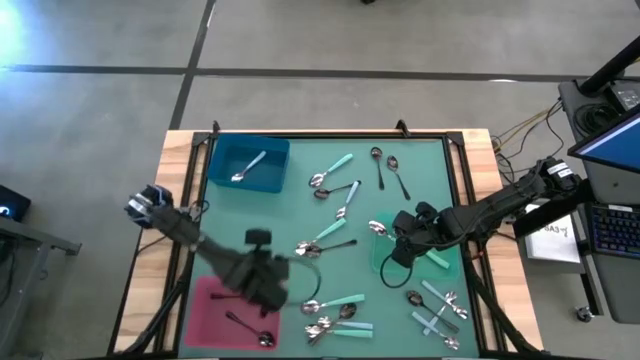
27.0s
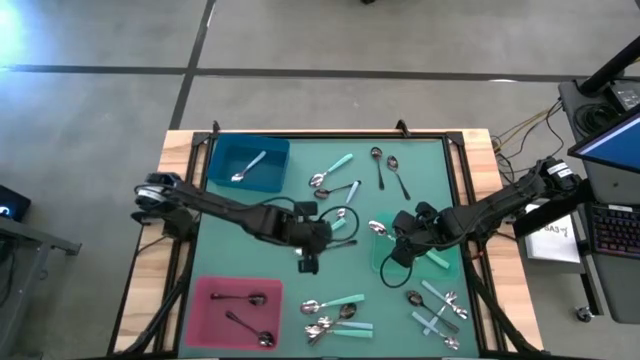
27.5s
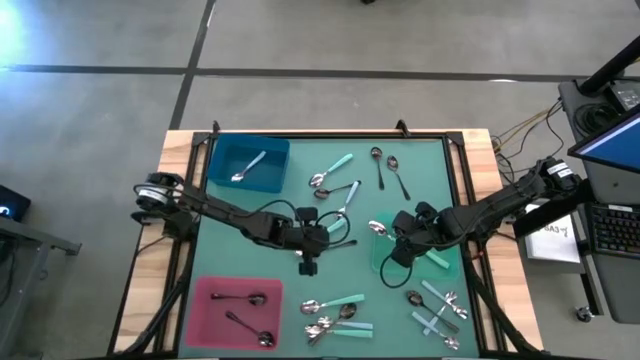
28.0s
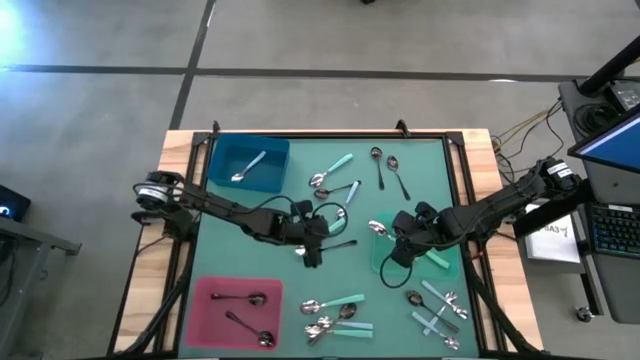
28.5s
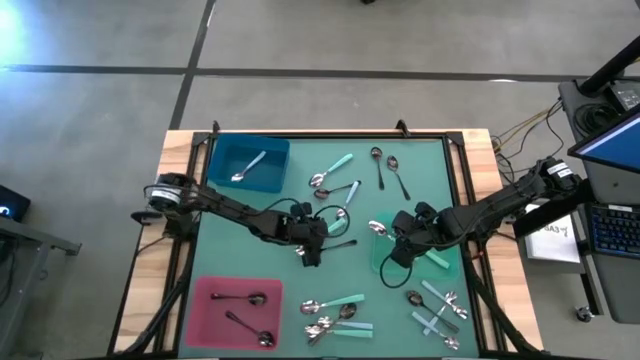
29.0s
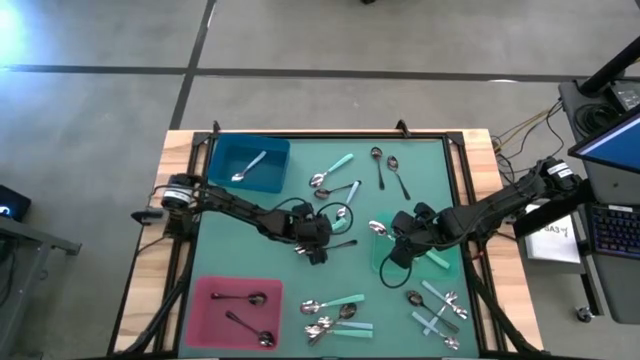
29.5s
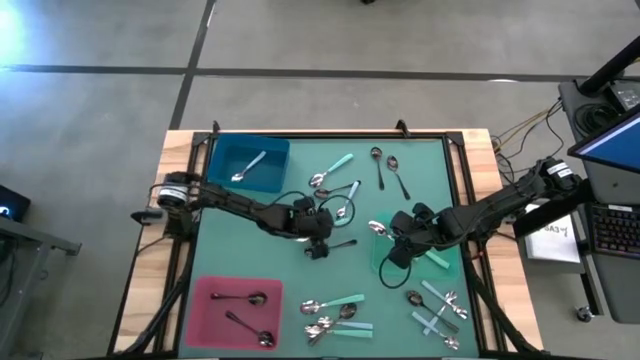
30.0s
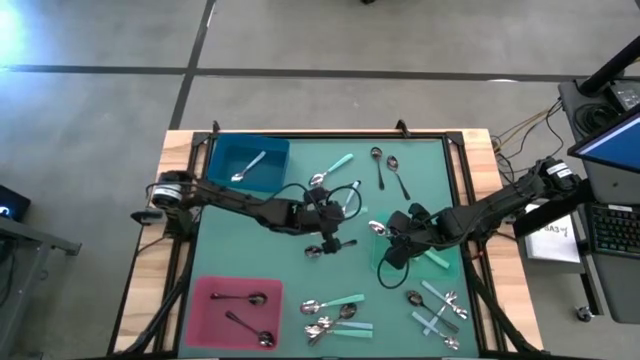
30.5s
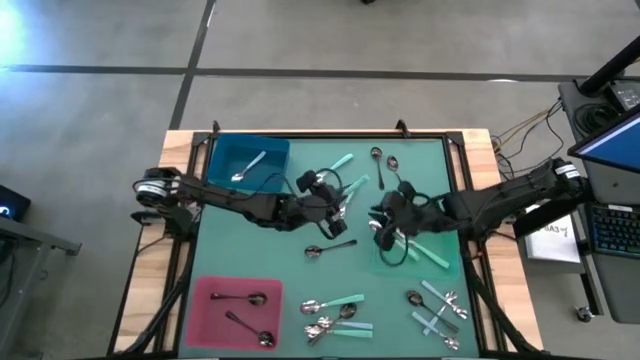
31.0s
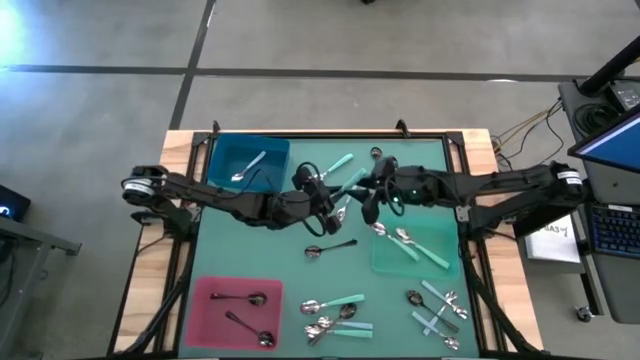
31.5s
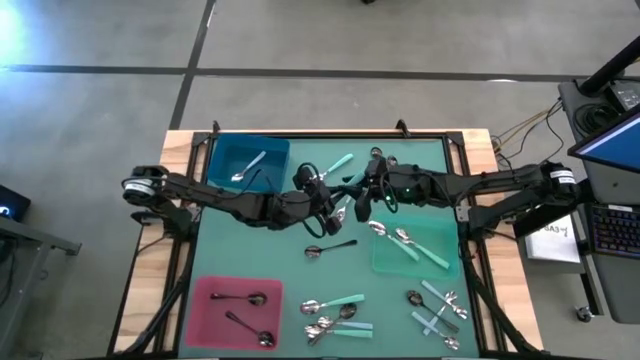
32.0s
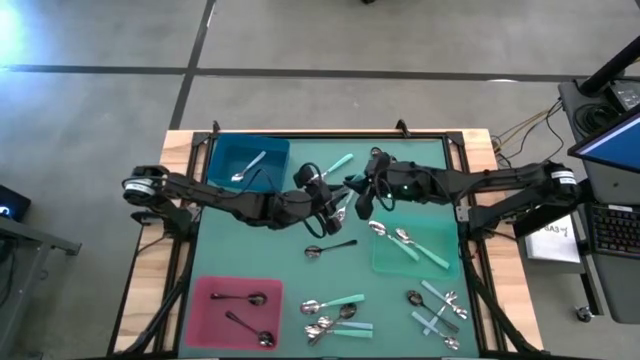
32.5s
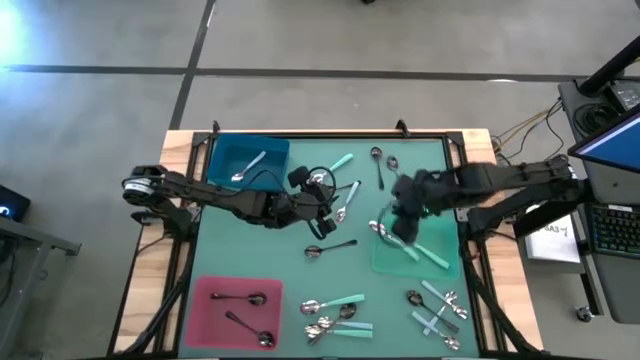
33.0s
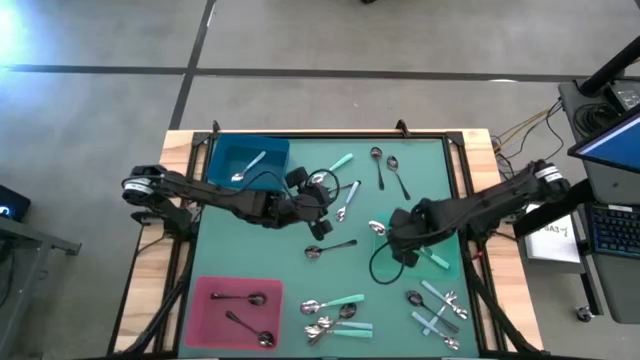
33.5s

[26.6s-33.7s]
Task: Sort silverware by color (type)
Put the green spoon into the green bin

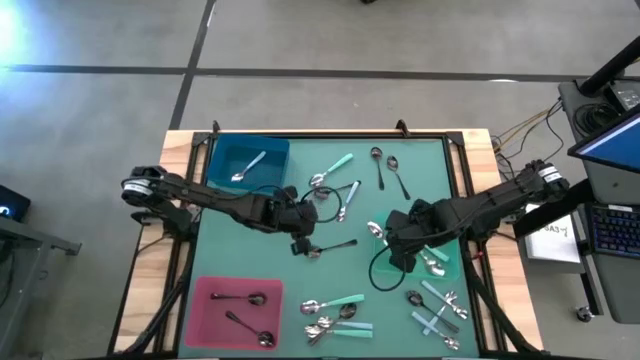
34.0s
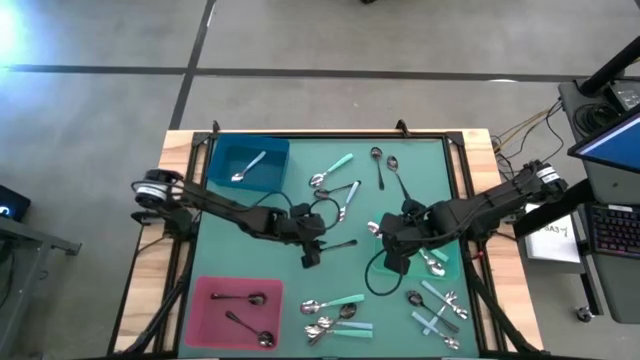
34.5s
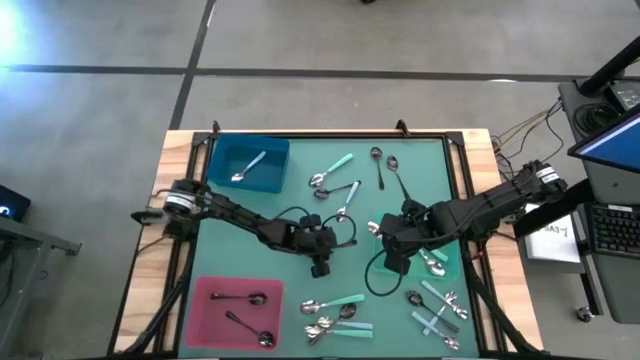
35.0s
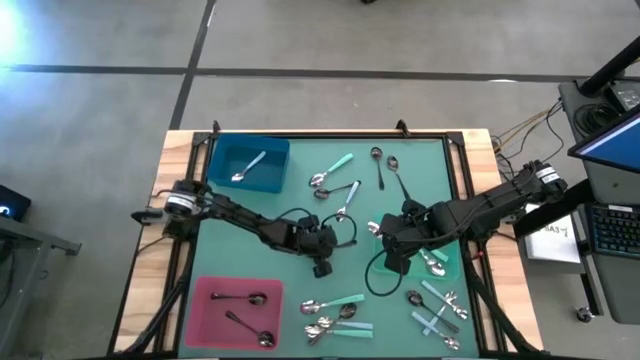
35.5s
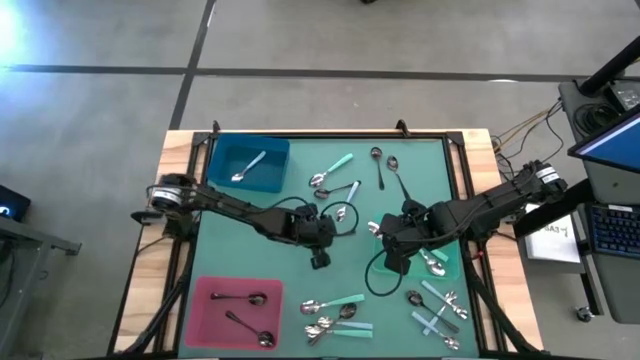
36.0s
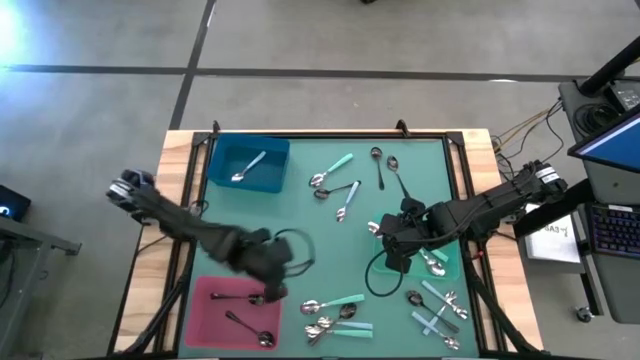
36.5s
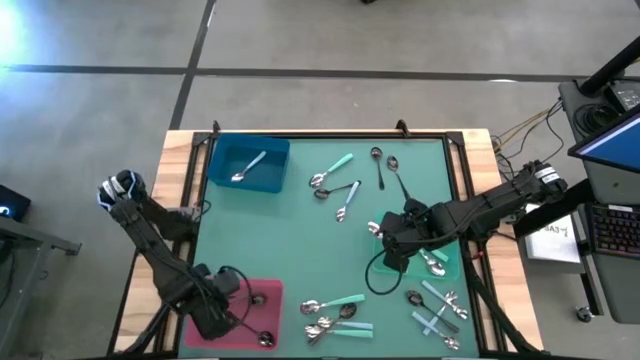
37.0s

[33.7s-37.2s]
Put the black spoon into the pink bin

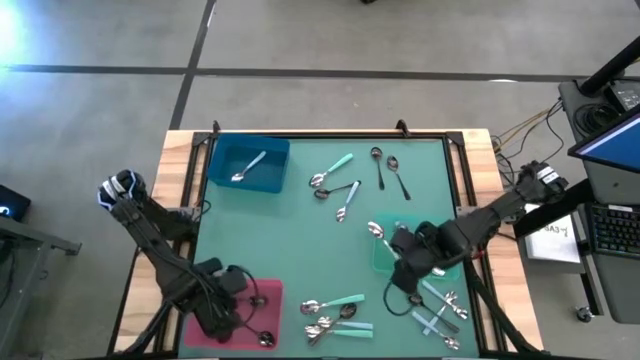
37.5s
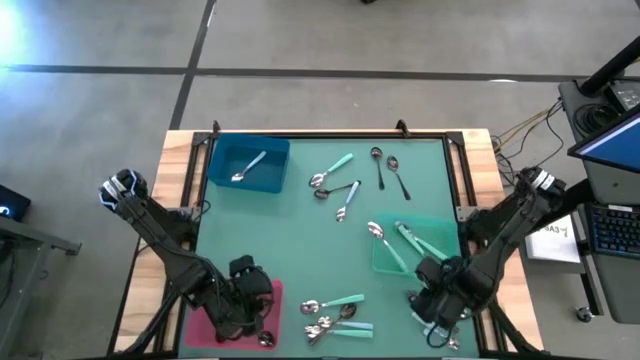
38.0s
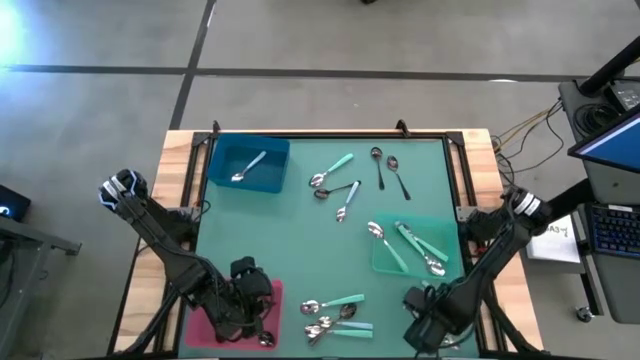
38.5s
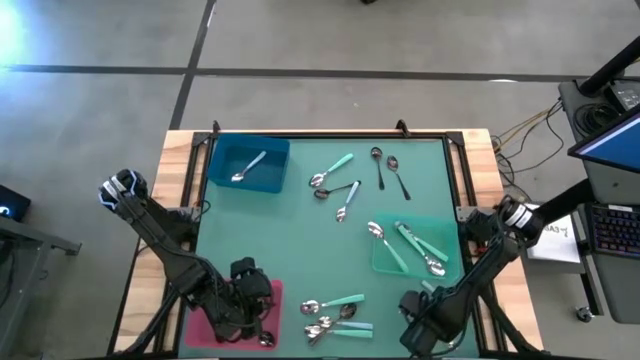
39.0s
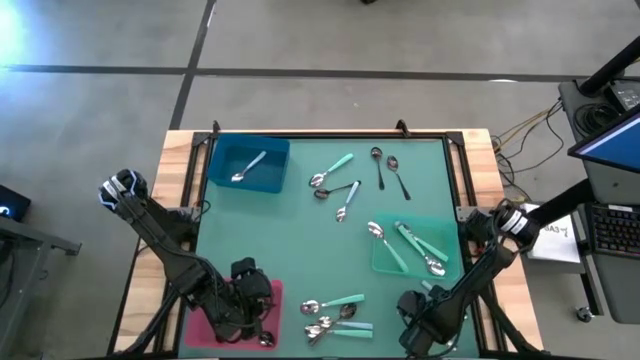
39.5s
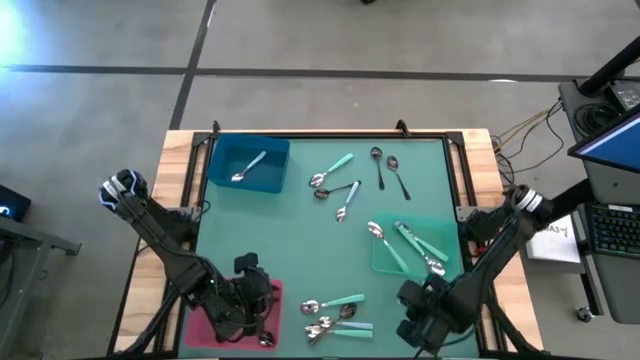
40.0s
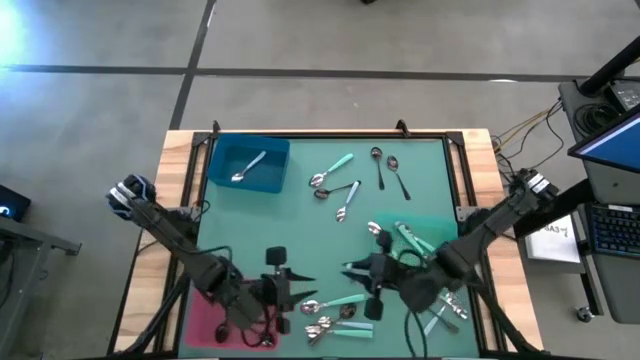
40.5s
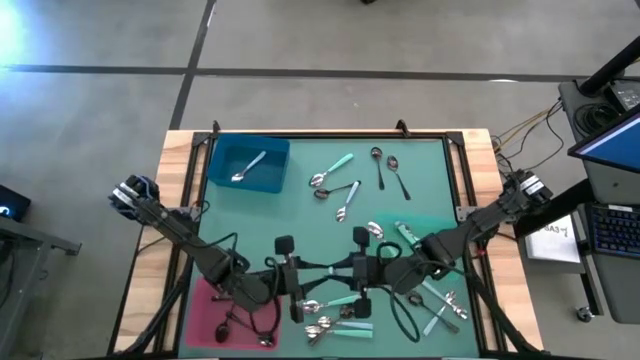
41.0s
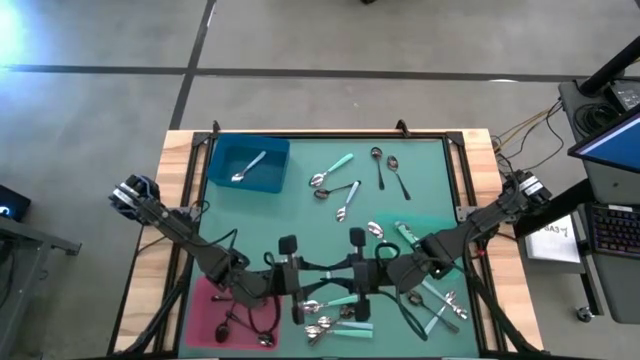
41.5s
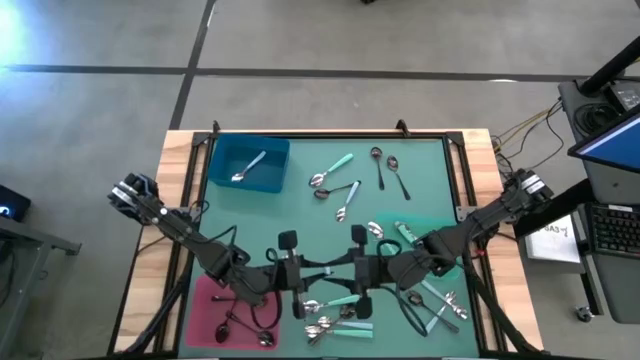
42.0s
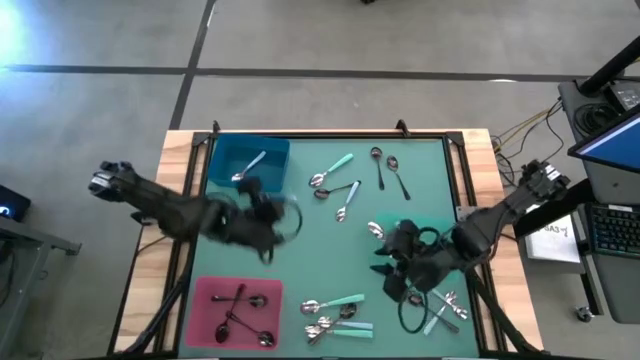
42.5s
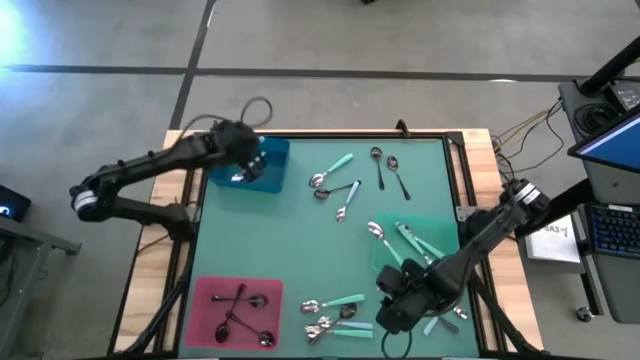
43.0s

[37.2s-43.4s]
Put the blue spoon into the blue bin

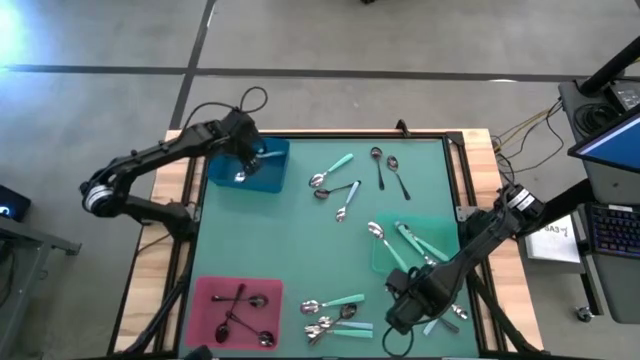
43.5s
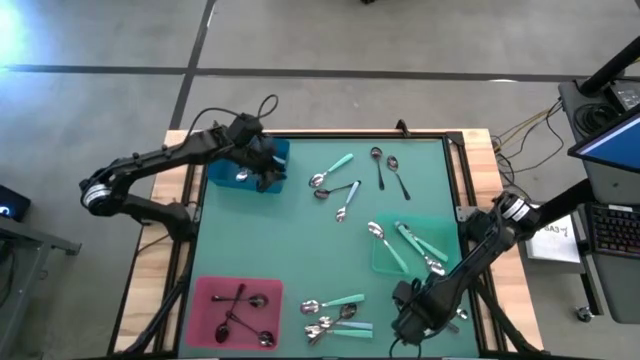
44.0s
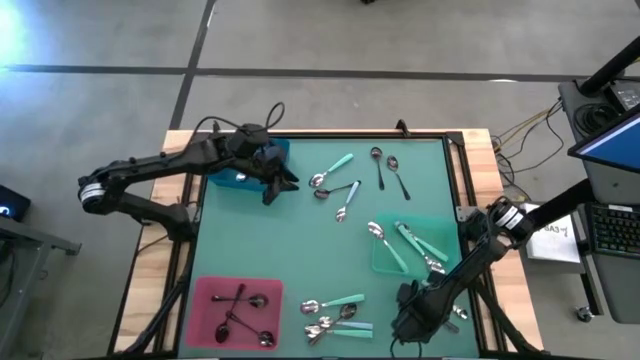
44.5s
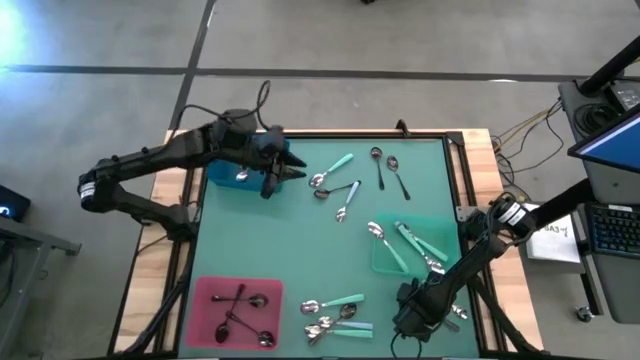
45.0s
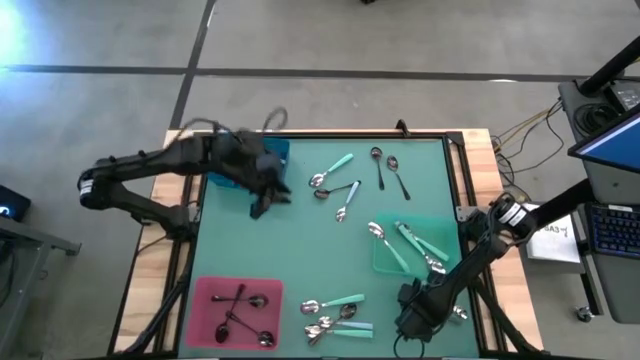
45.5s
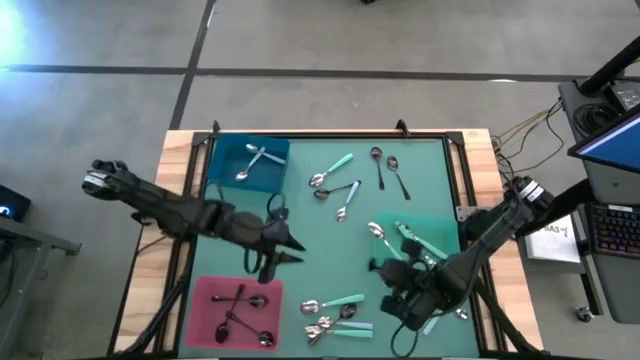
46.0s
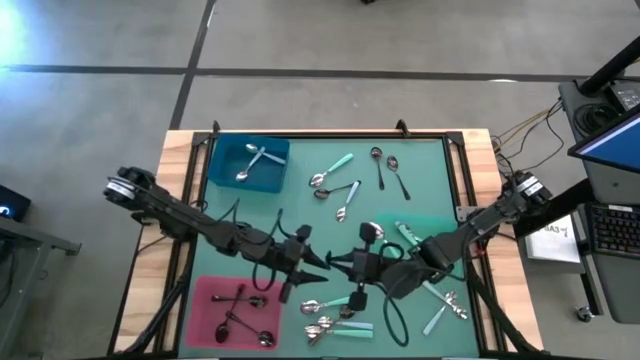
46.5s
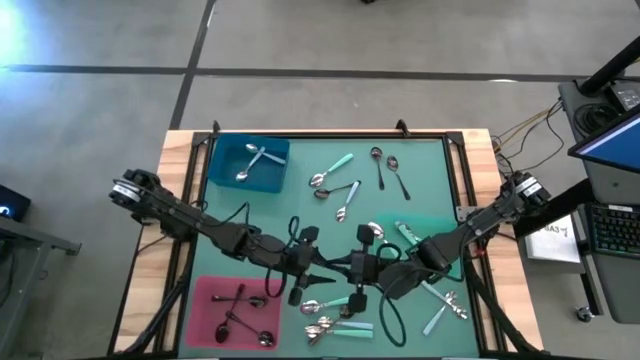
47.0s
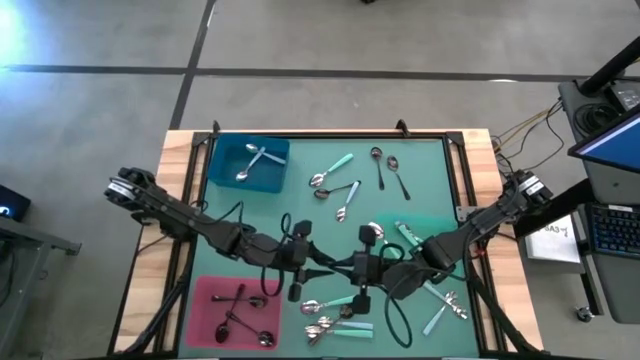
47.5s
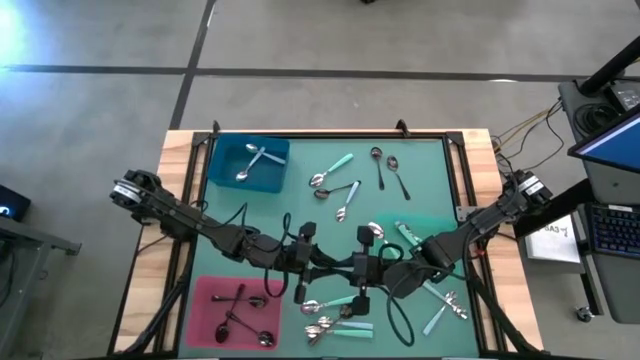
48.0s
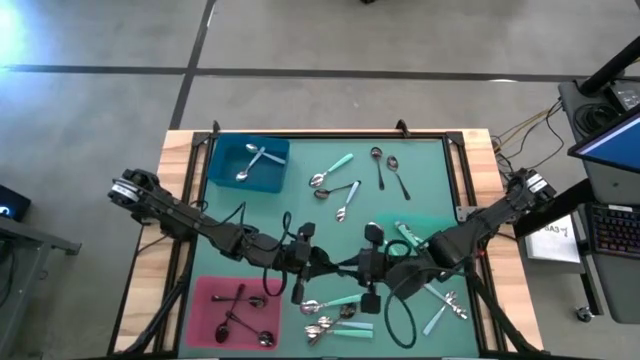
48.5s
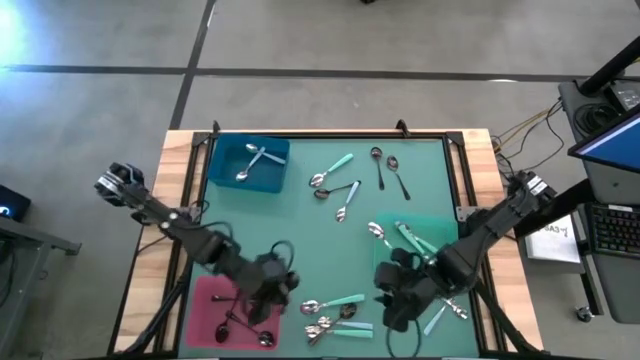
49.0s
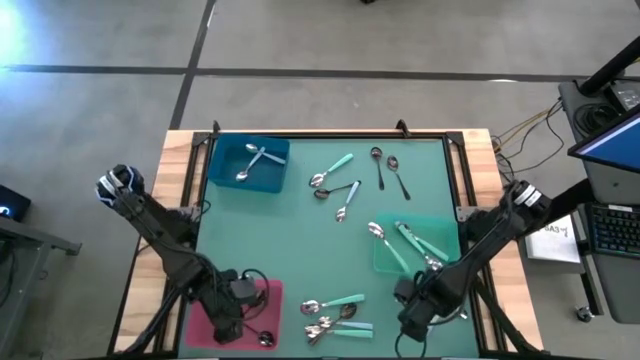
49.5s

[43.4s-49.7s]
Put the black spoon into the pink bin
